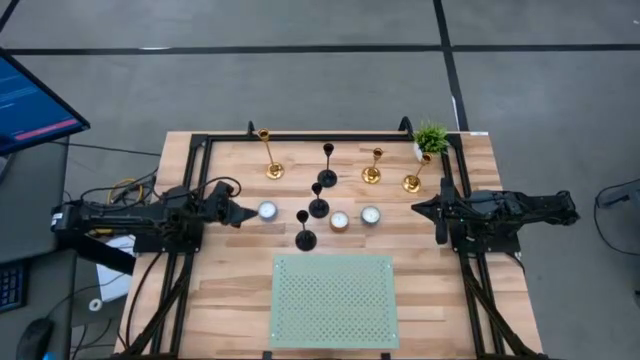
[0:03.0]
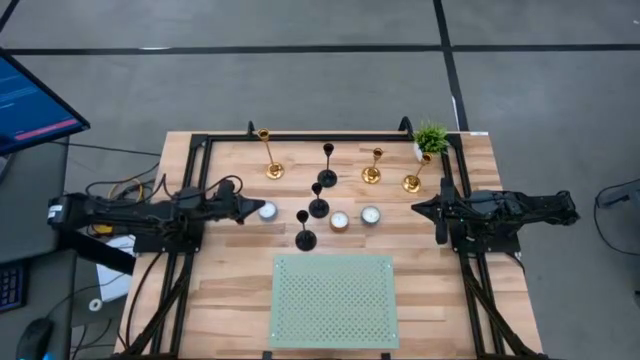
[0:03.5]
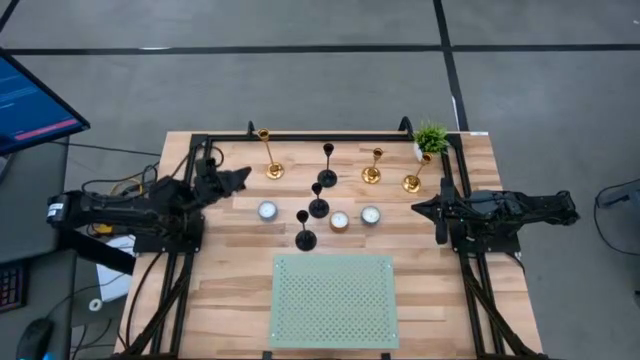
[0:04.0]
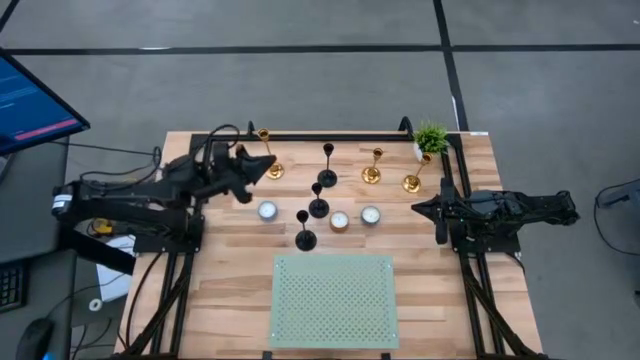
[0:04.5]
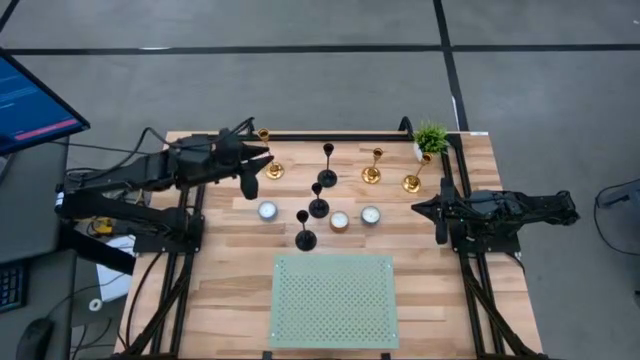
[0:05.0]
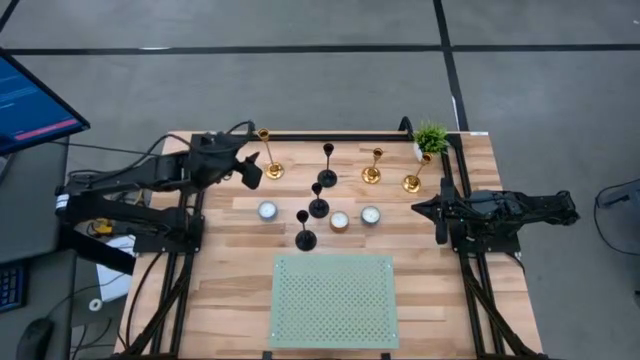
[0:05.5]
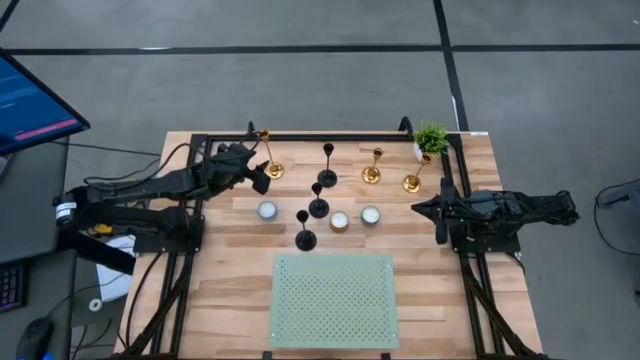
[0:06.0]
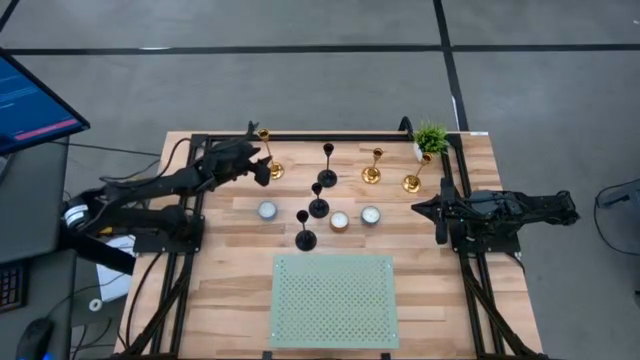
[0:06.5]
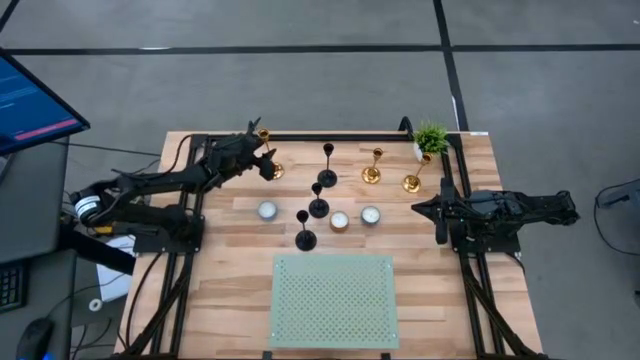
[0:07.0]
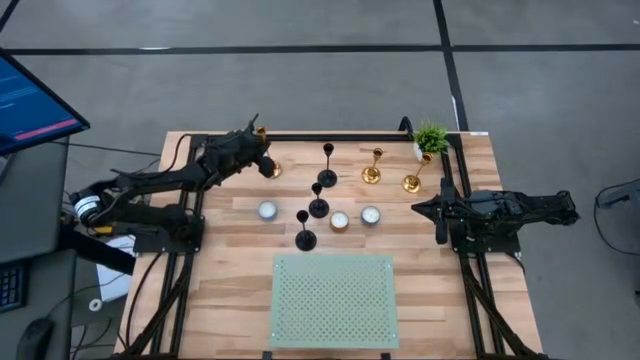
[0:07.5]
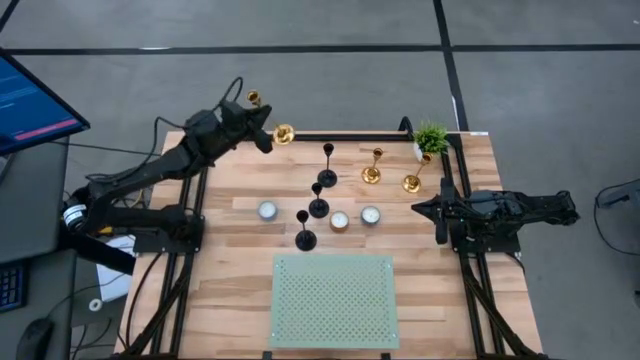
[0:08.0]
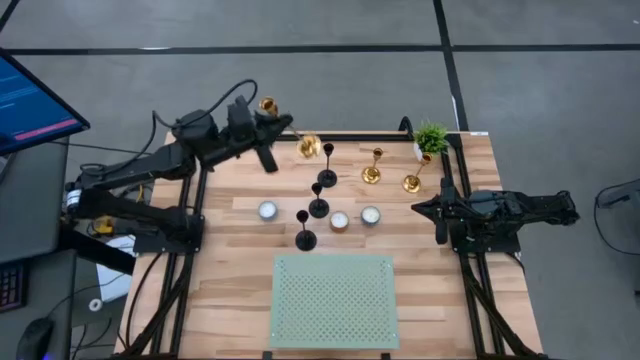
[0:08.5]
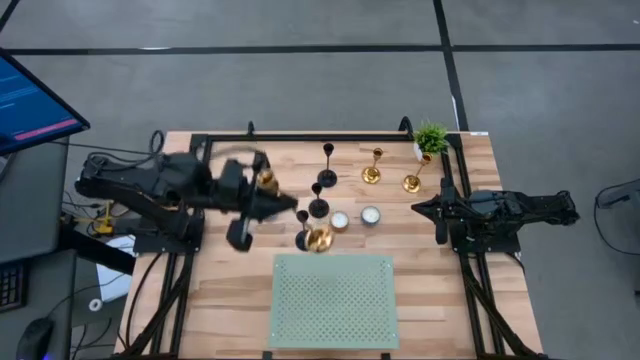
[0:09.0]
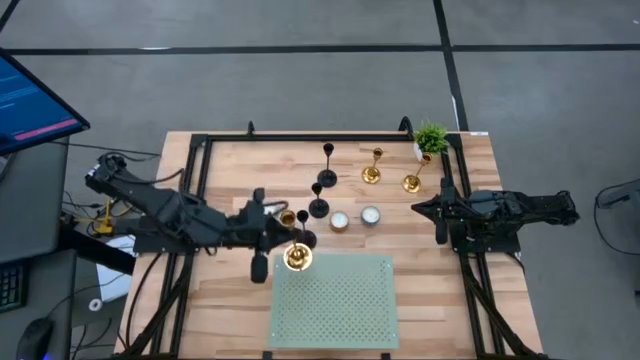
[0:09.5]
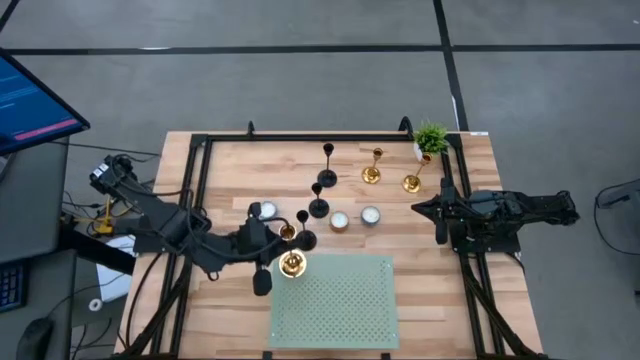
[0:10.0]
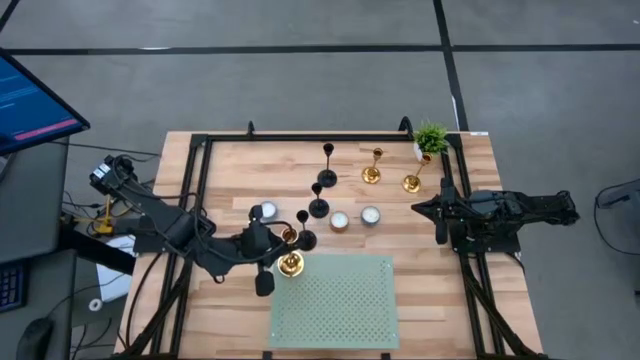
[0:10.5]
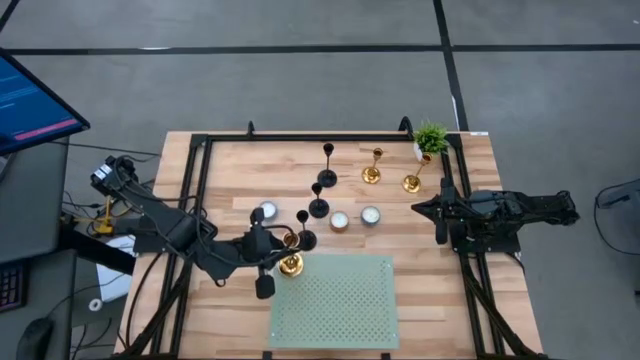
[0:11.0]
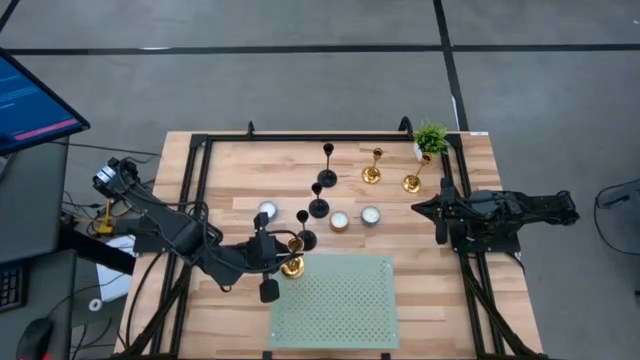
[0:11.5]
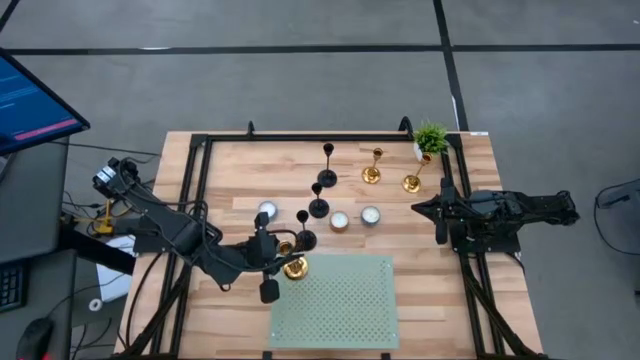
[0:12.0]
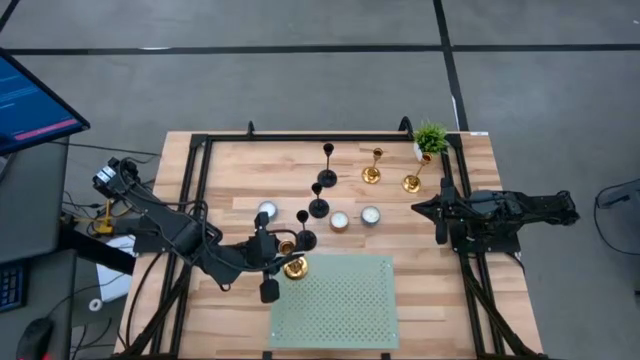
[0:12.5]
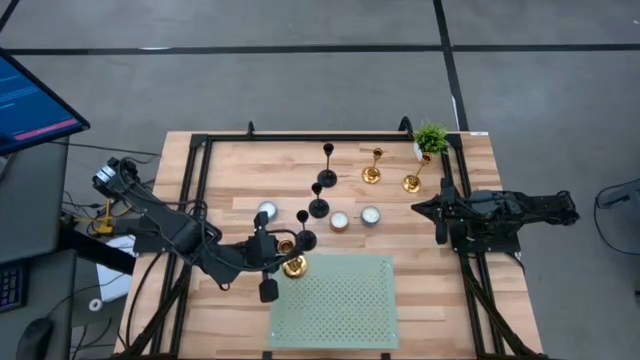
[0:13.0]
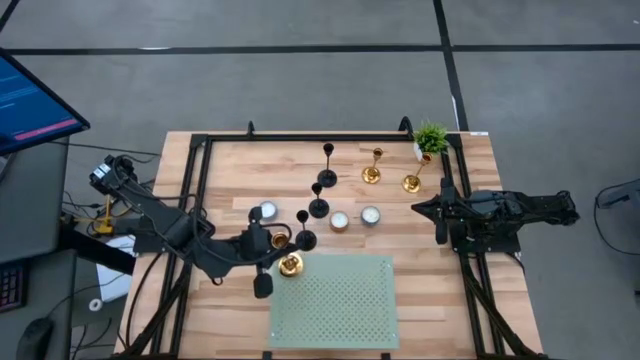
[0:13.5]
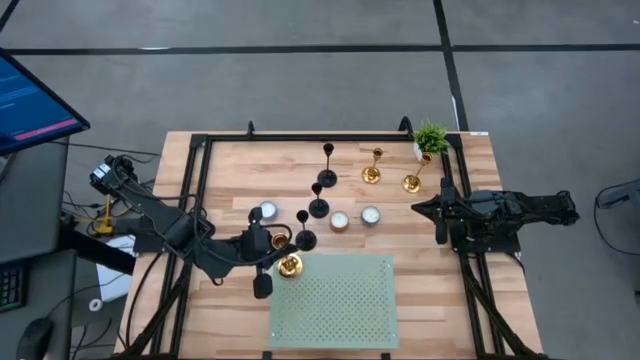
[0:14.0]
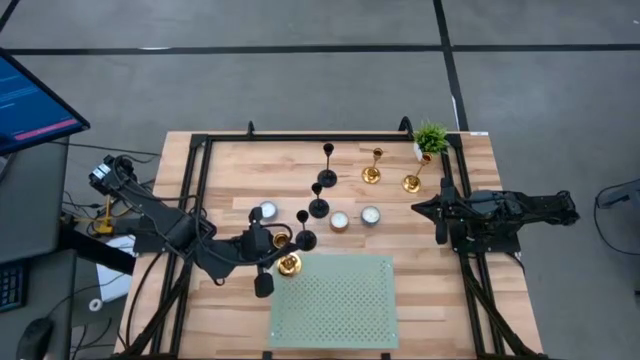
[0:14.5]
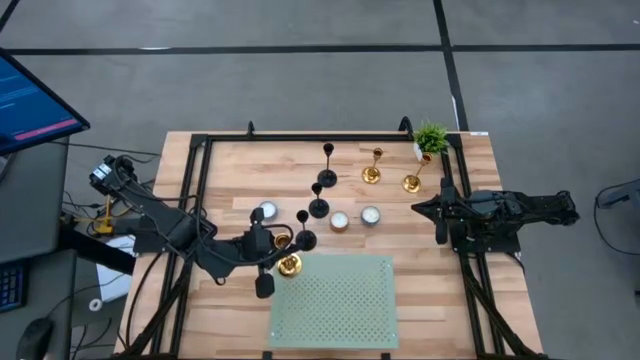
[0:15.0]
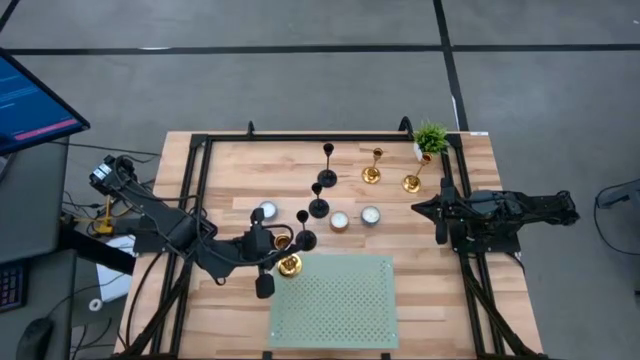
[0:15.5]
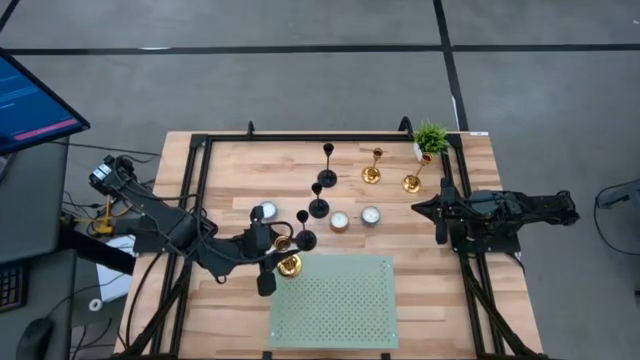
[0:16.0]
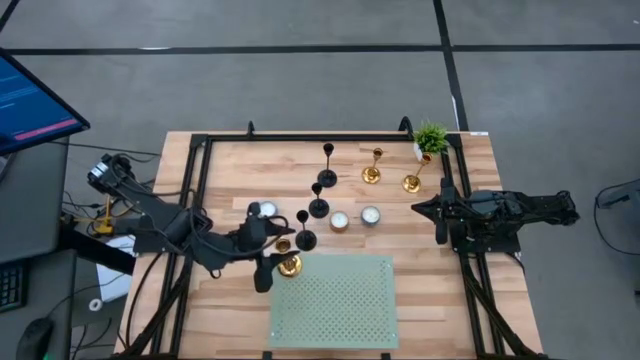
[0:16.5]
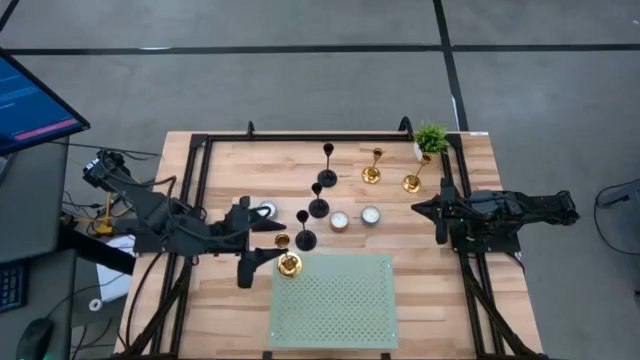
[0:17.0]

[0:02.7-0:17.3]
Task: Pick & Place candle stick holders
Put the left gold candle holder on the shelf

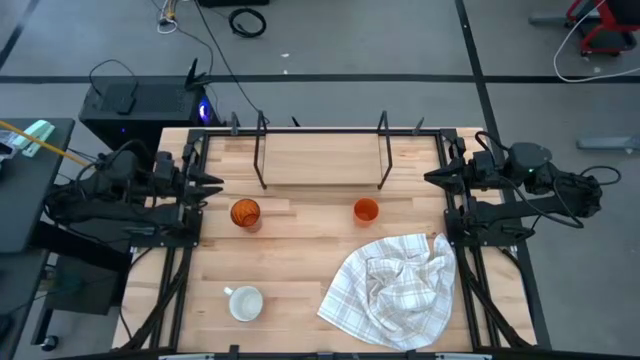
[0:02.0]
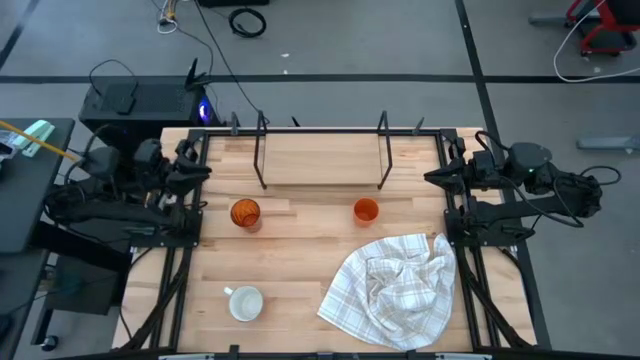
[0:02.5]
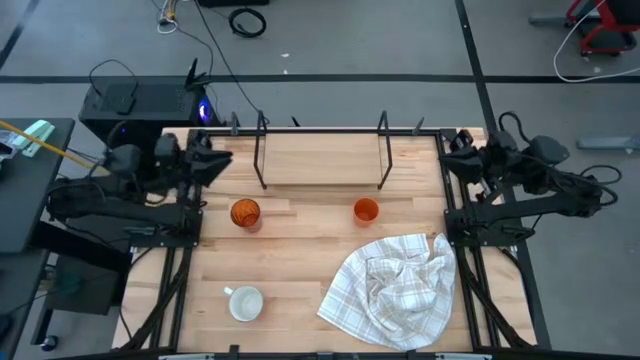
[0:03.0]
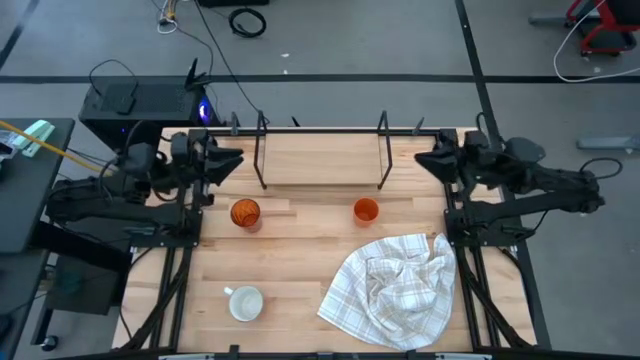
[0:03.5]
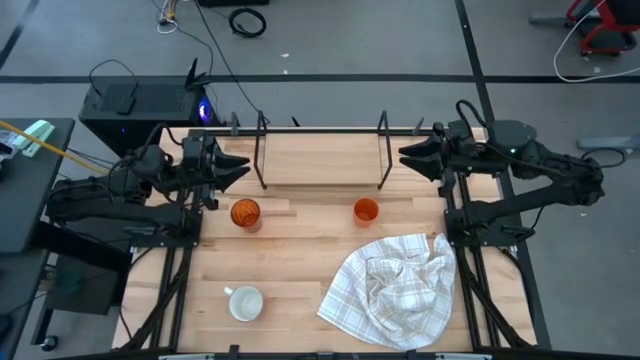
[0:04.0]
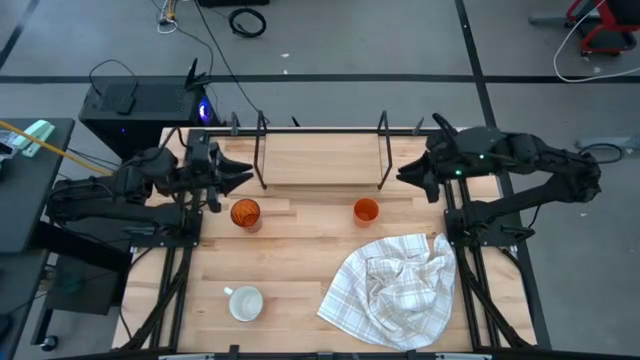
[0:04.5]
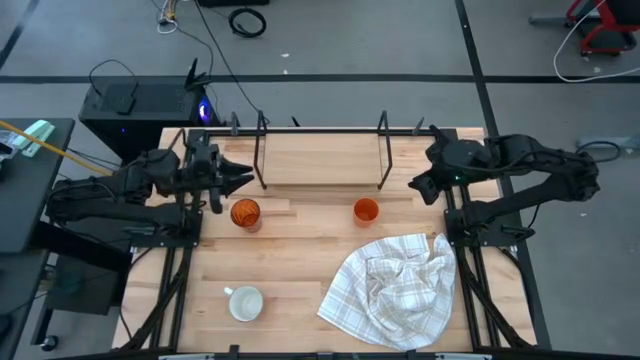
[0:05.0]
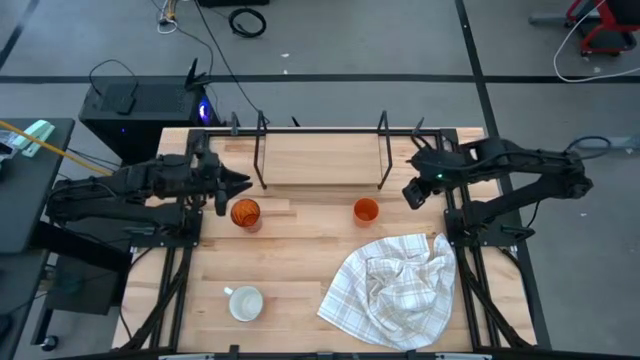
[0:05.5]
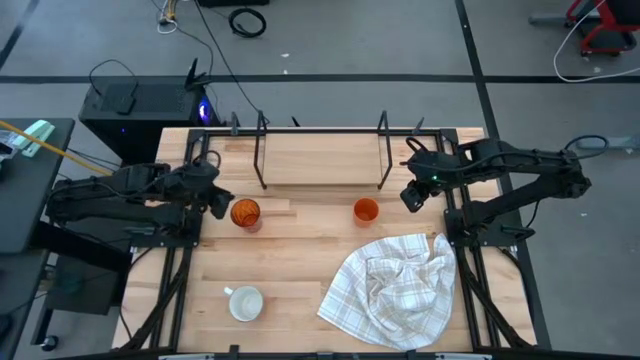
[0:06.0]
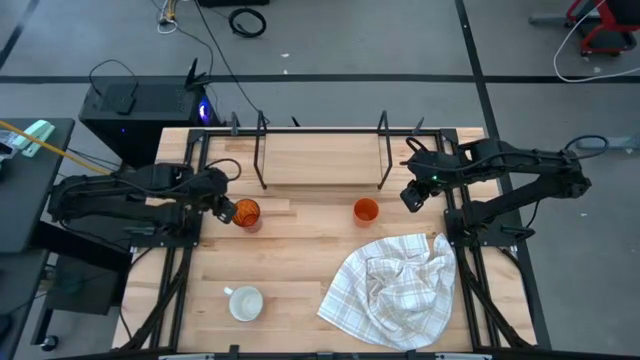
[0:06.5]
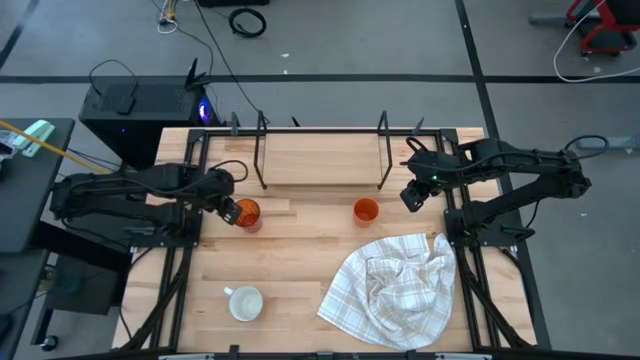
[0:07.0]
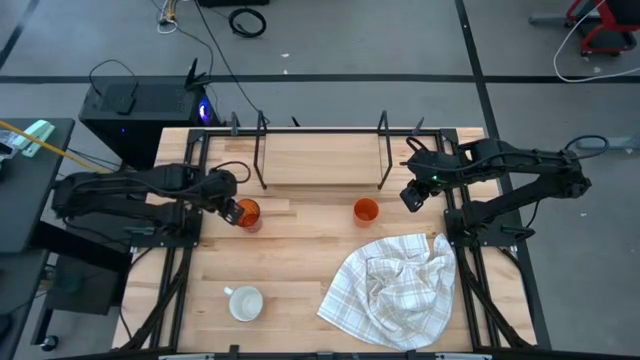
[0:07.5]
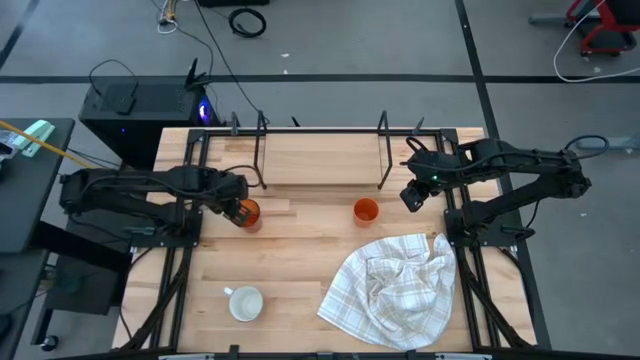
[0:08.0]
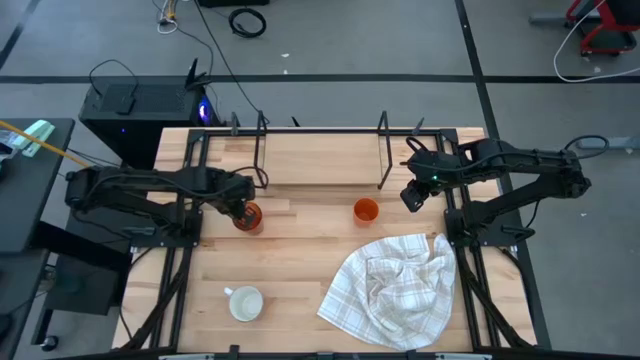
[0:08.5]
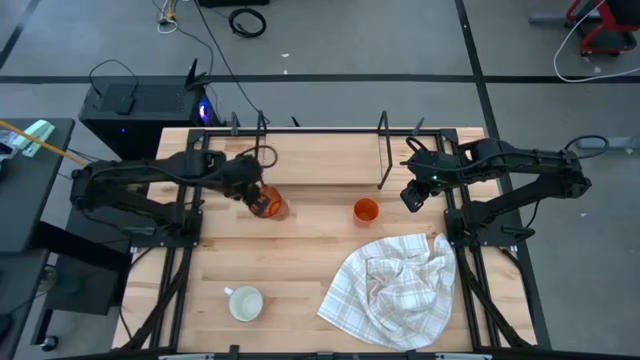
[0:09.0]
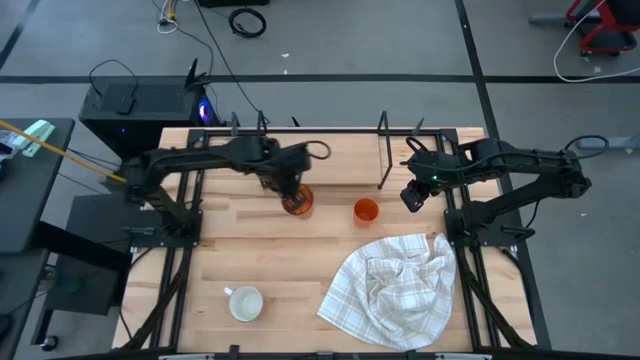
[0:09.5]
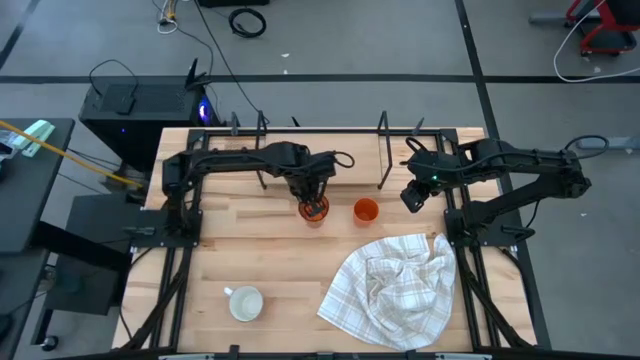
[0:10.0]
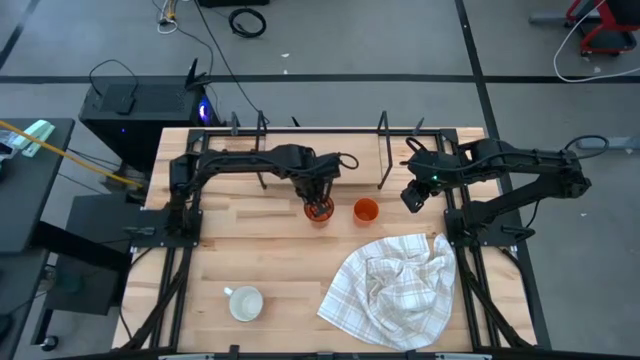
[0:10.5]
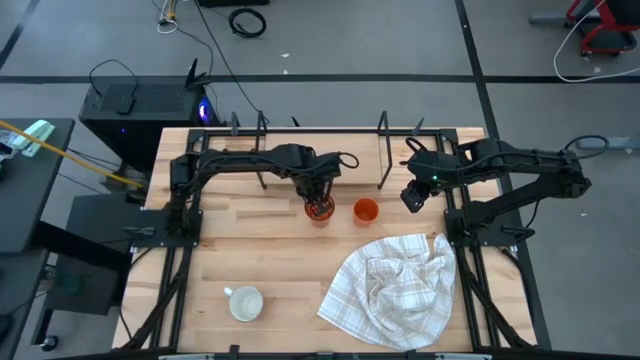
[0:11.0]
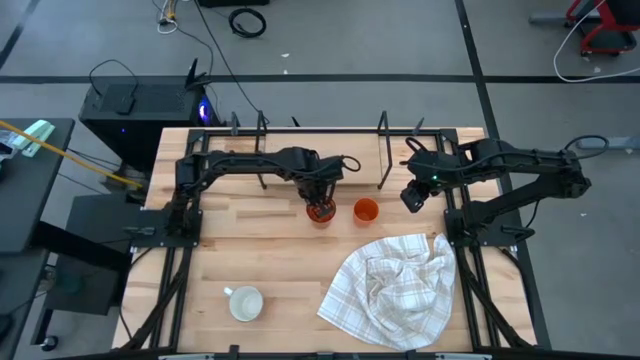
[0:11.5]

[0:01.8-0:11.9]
Task: Stack small to large cups/mugs on shelf
Move the orange cup to the left of the dark orange cup
